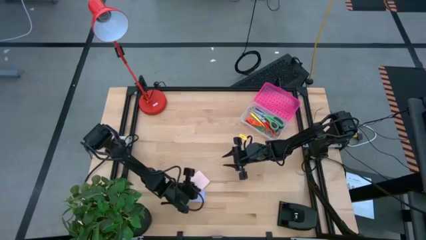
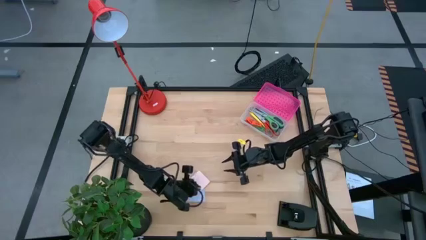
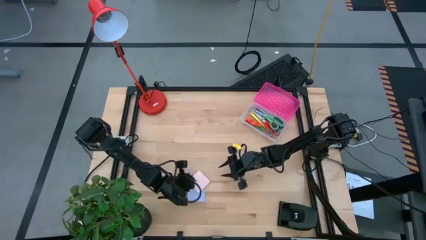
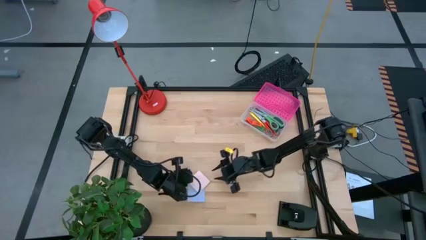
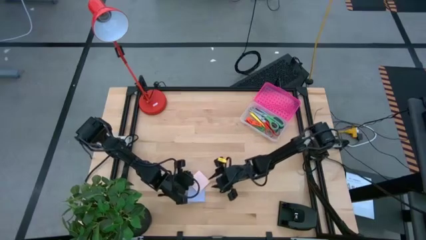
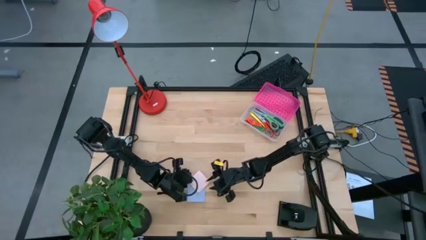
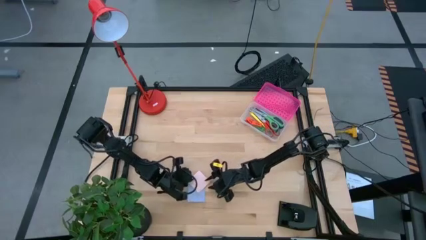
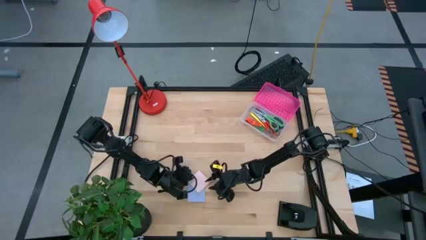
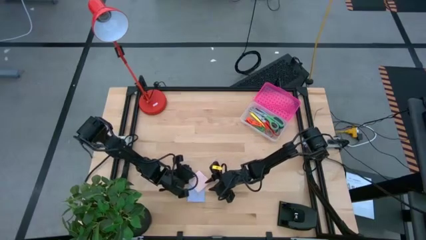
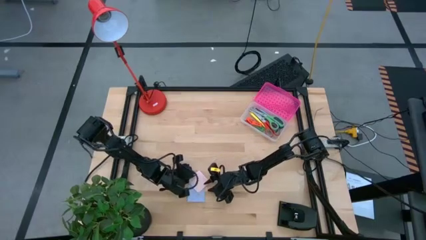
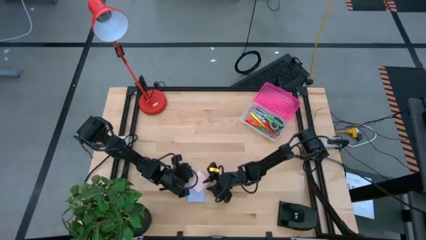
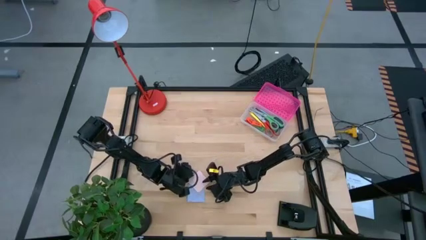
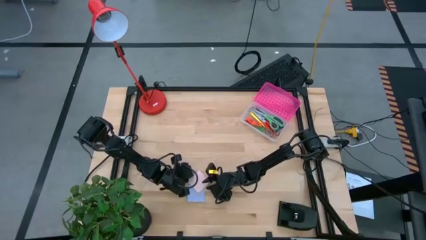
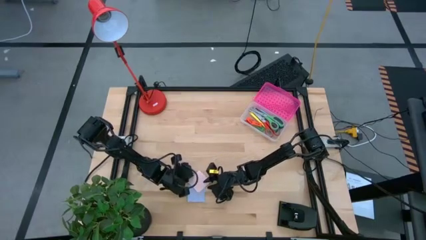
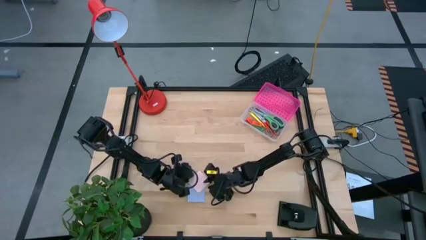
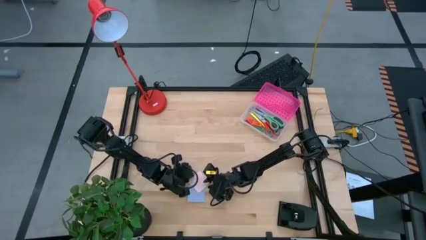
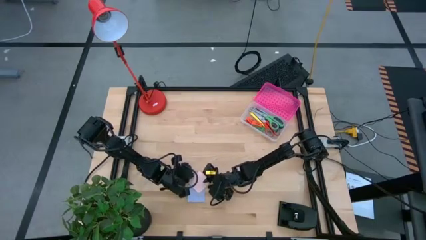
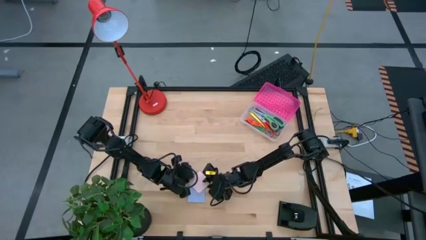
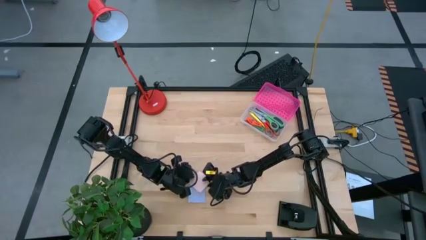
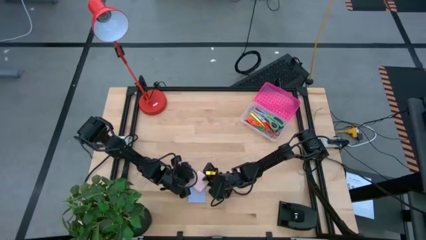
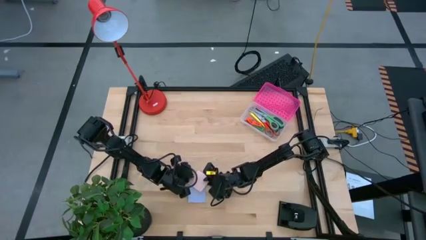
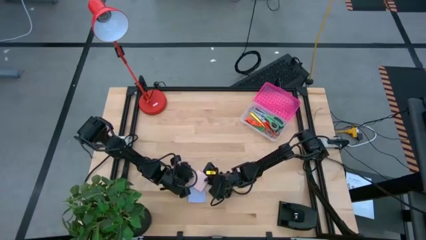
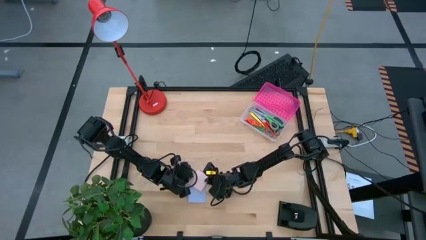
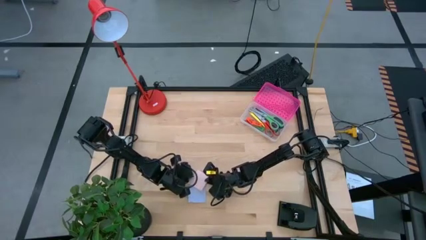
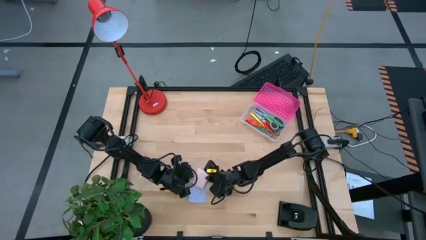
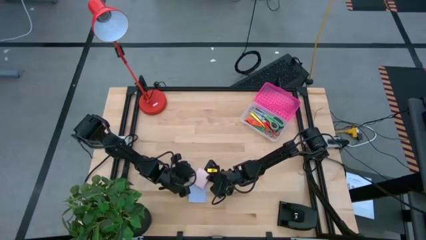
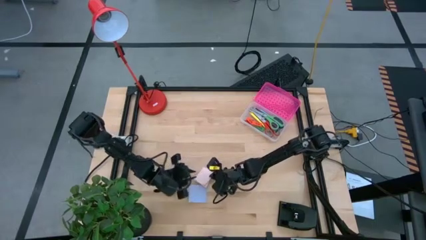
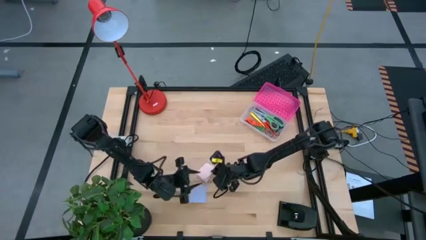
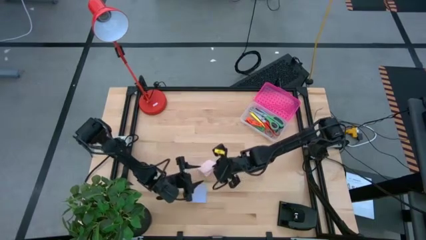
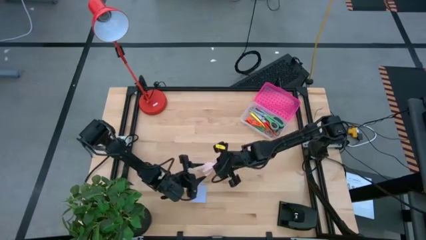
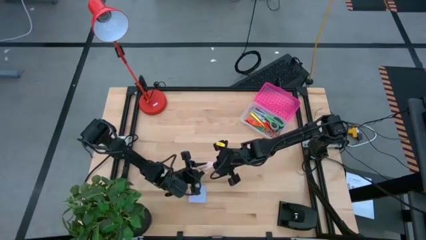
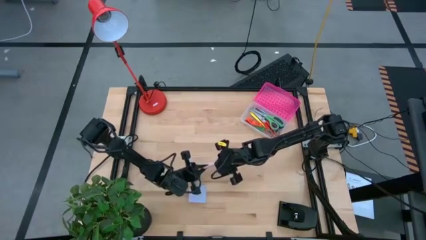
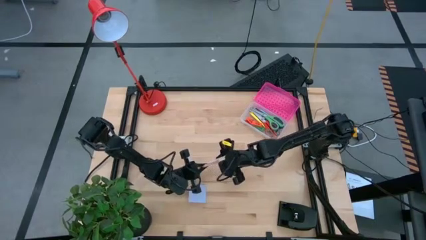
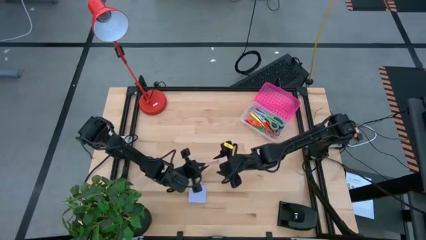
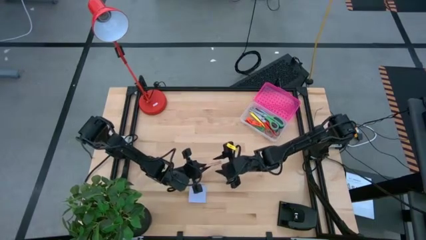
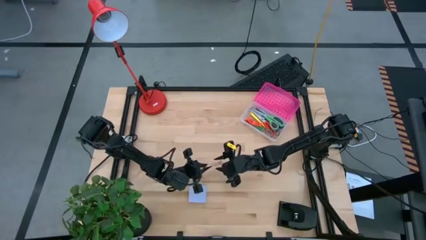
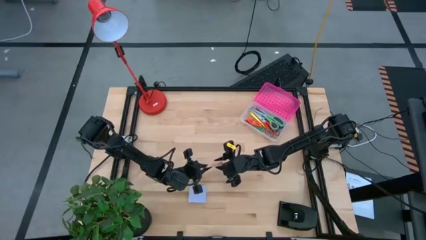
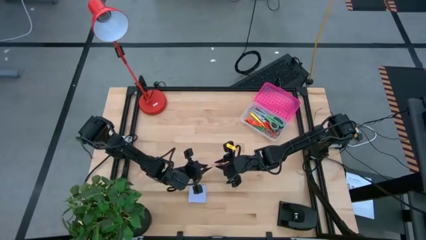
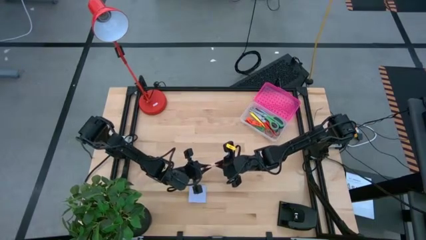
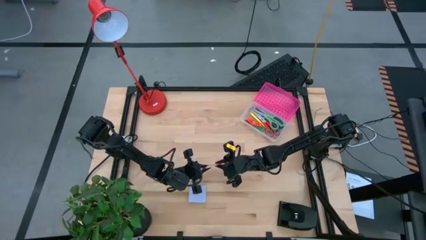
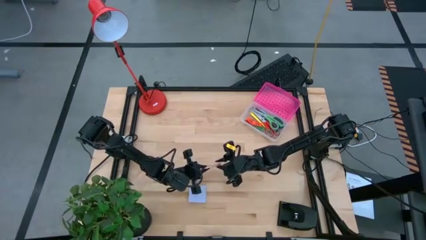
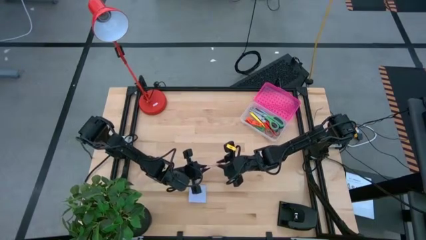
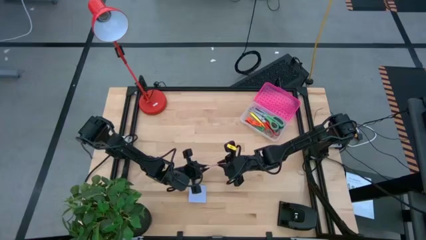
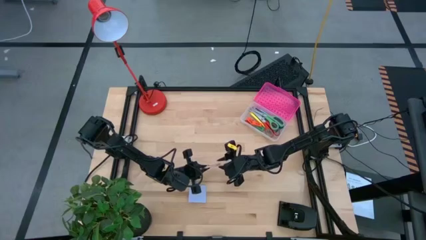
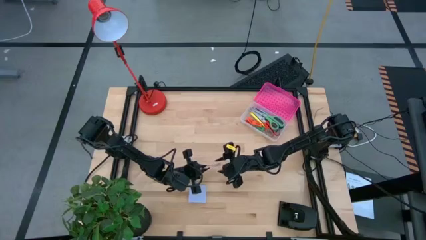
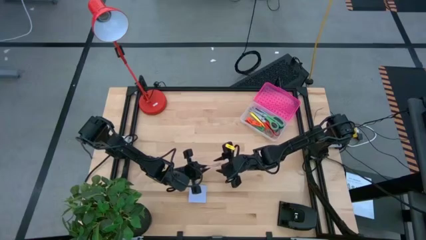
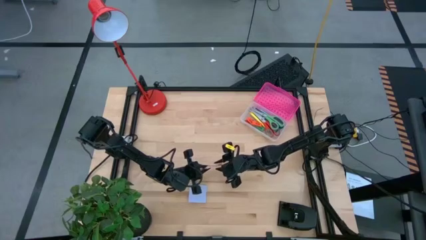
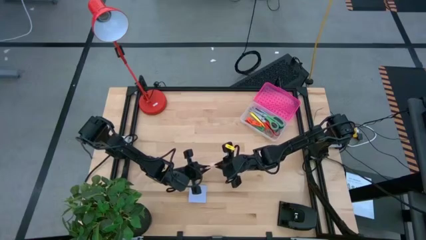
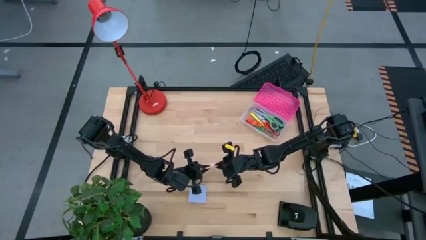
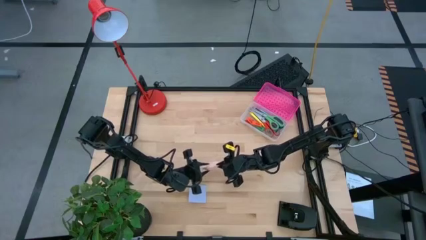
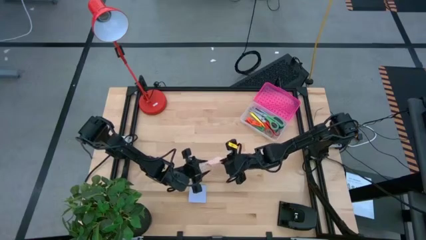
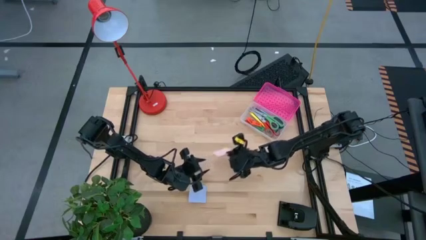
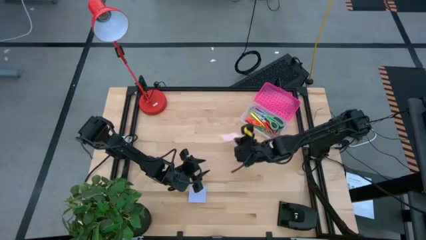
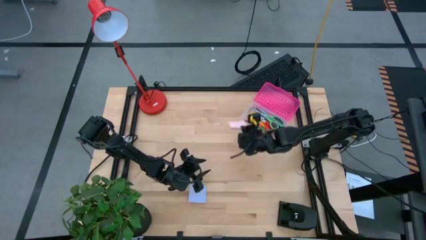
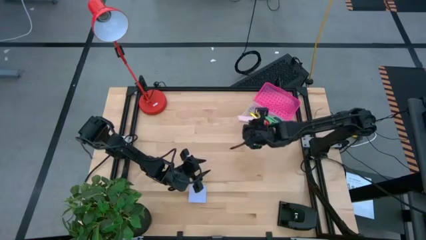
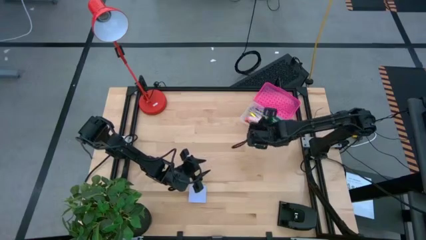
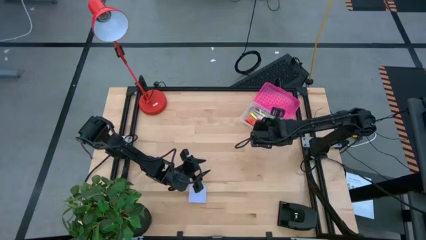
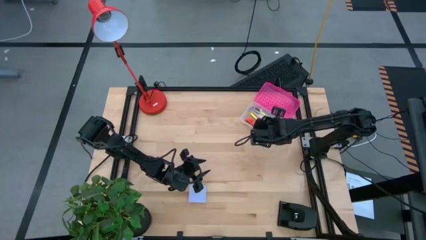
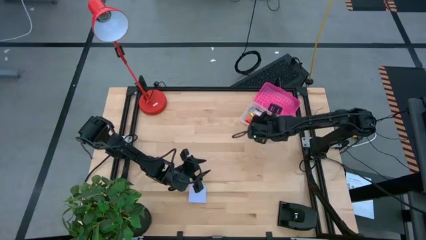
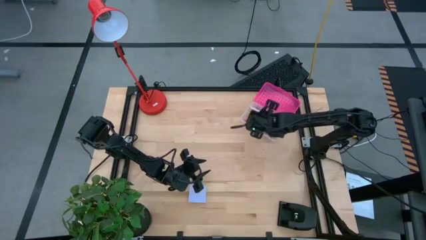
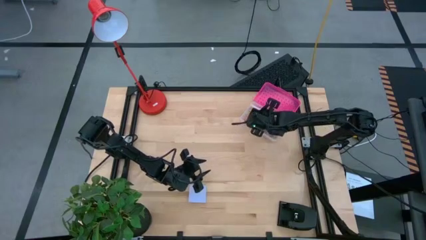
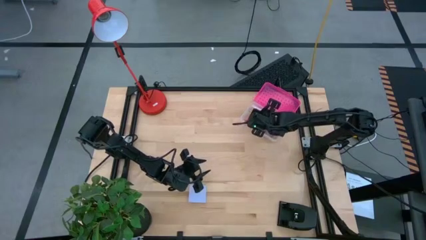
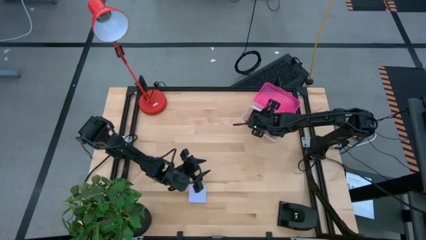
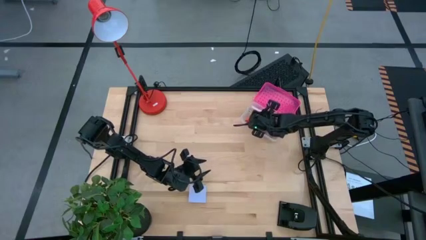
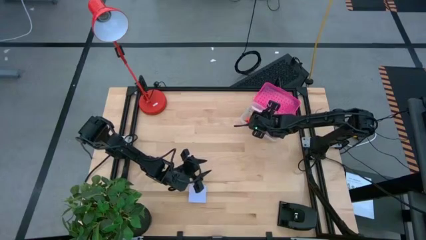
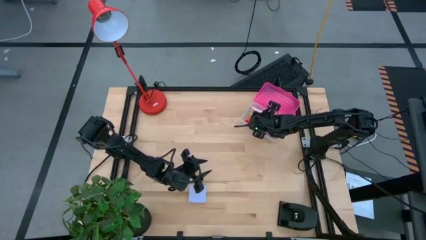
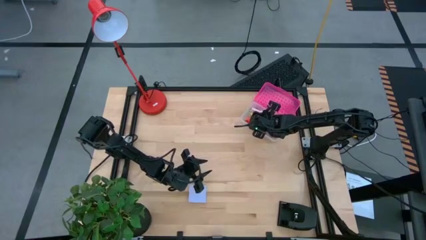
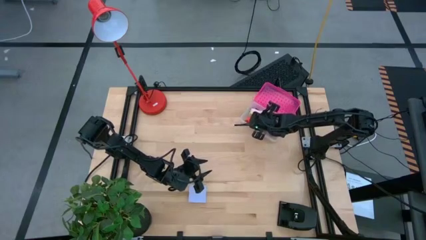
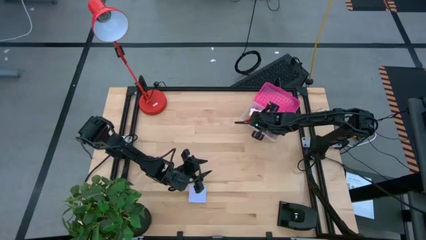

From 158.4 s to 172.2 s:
Task: Pack school essentials
Put the pink sticky notes into the supply box
